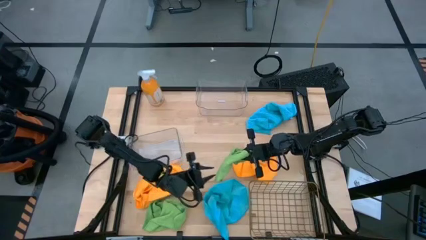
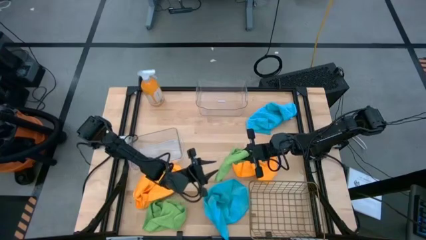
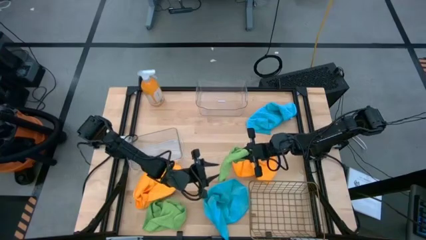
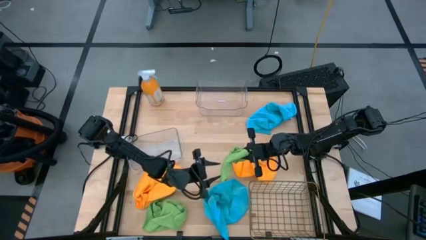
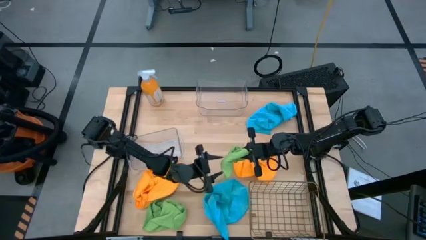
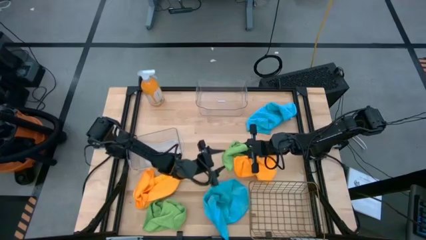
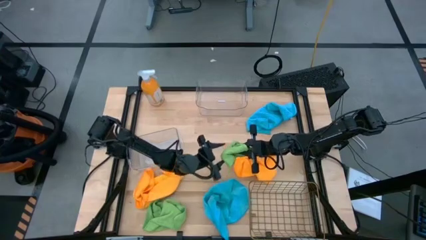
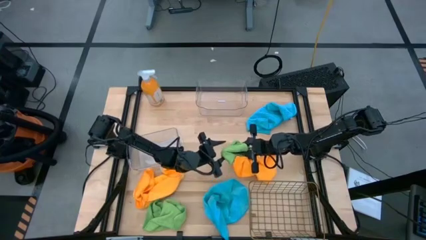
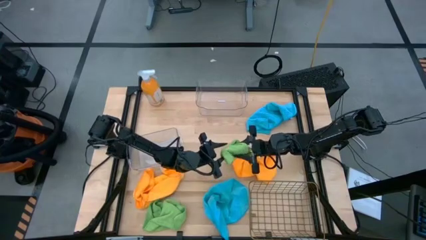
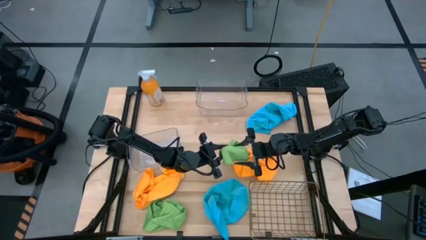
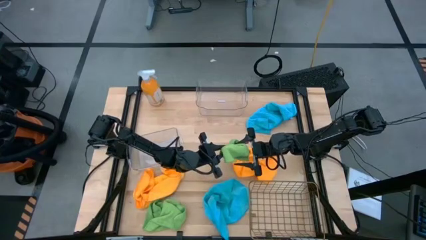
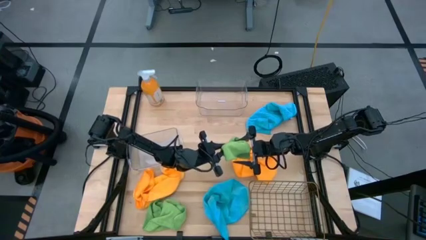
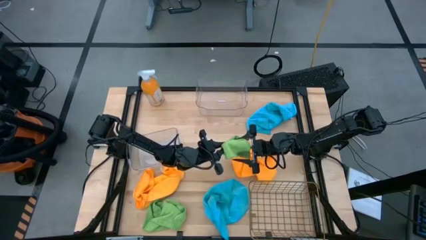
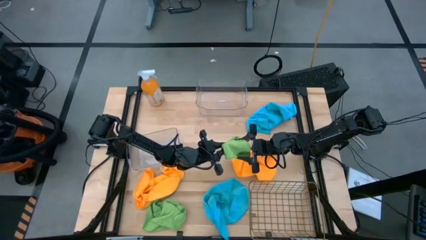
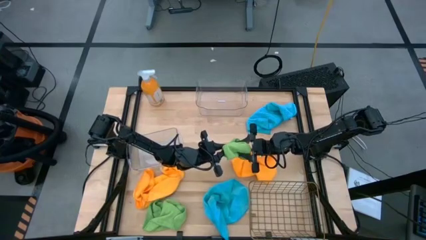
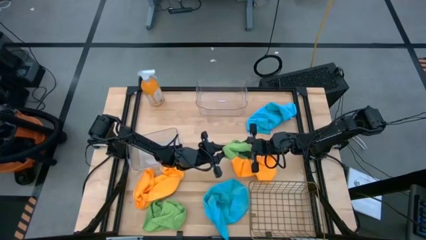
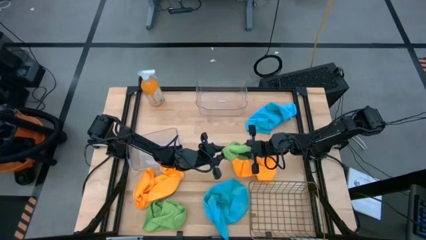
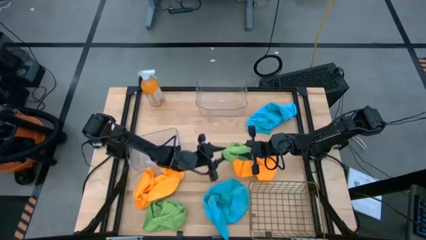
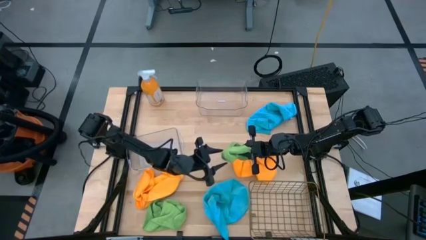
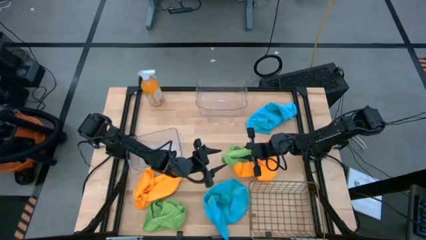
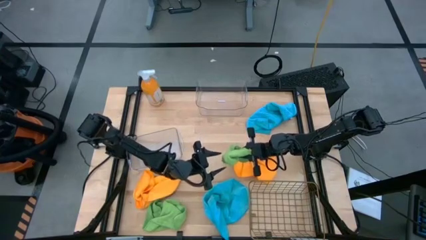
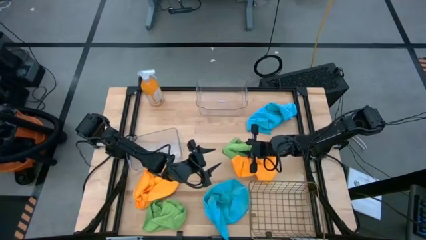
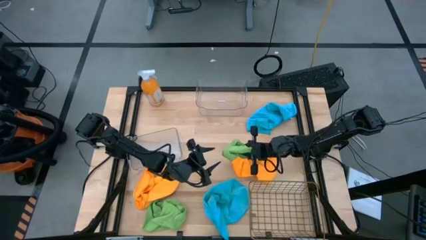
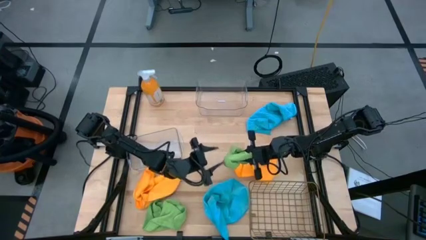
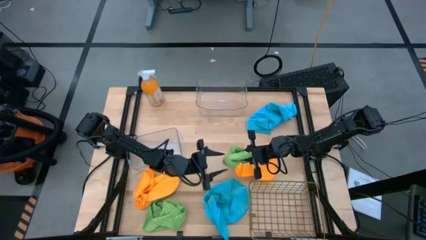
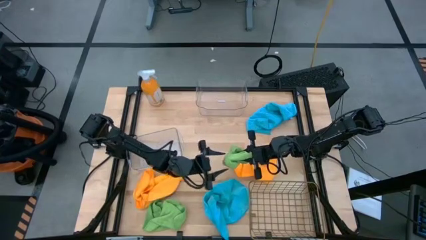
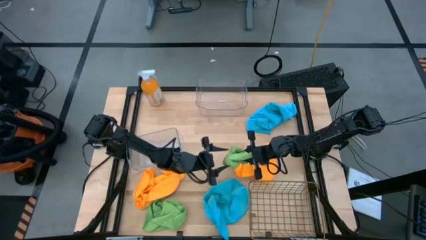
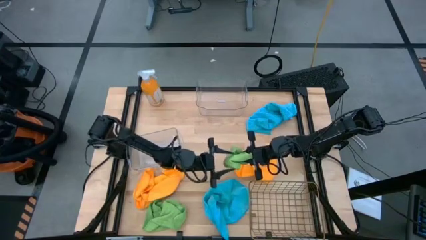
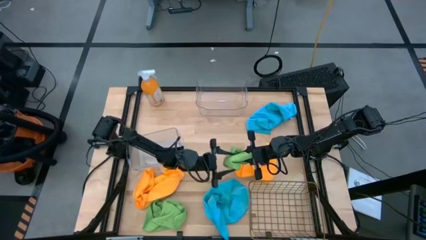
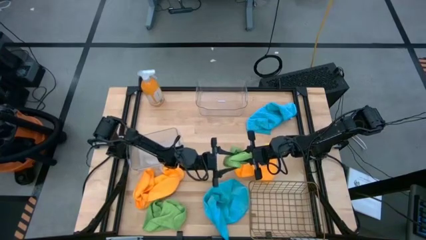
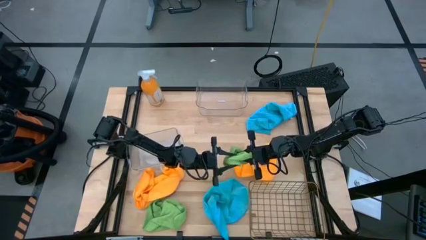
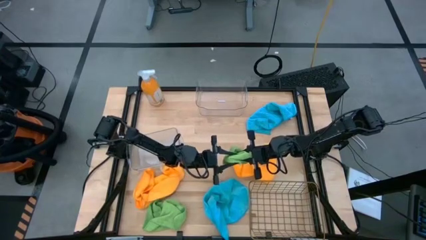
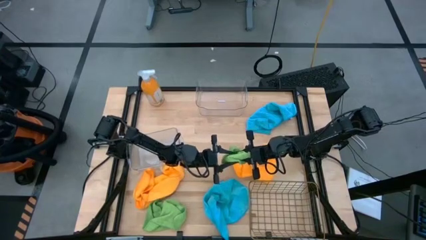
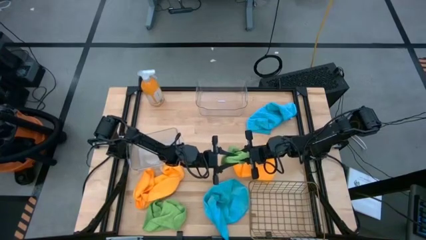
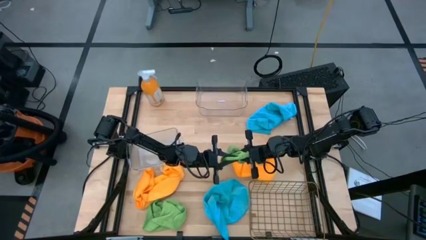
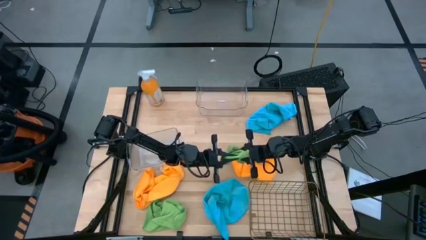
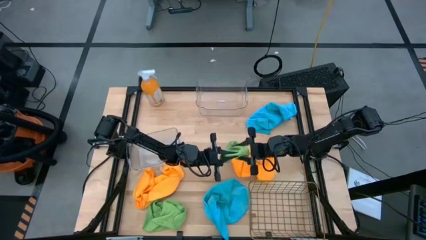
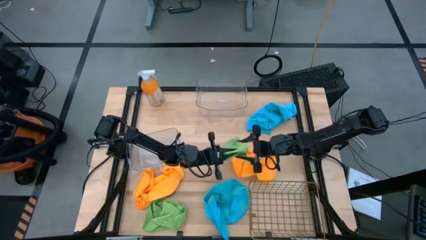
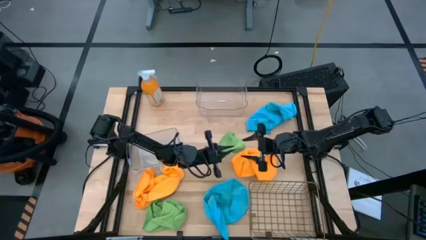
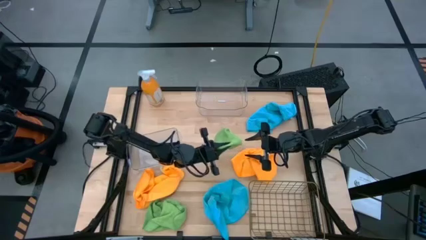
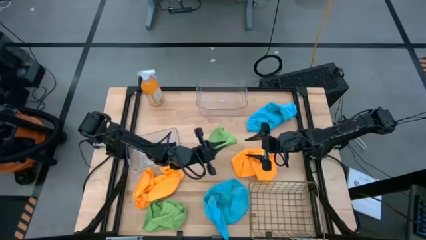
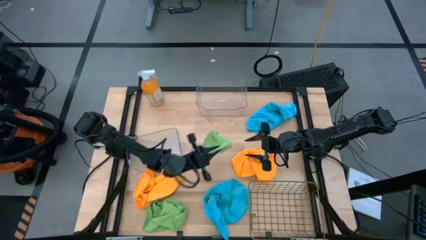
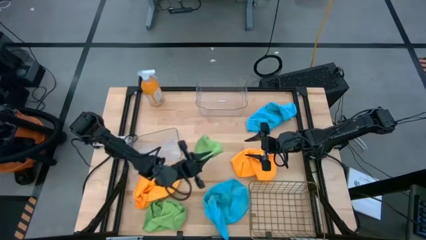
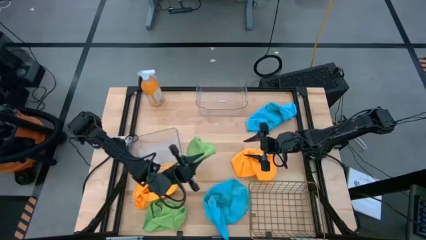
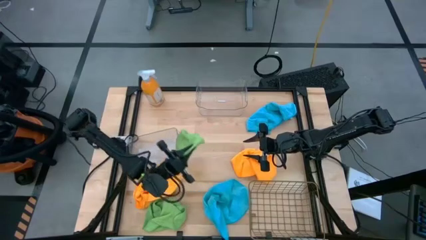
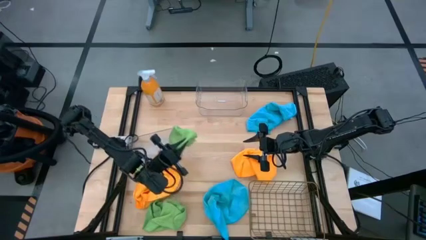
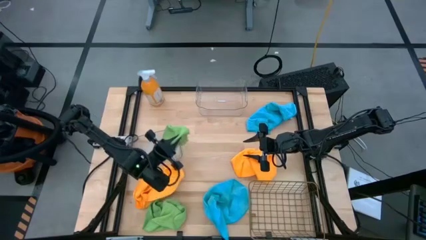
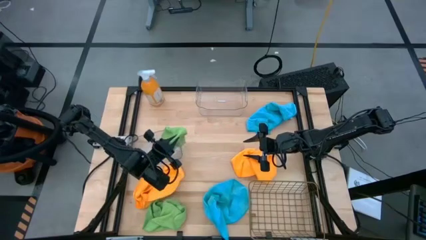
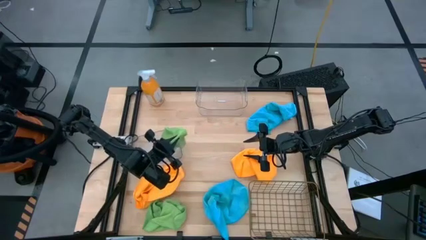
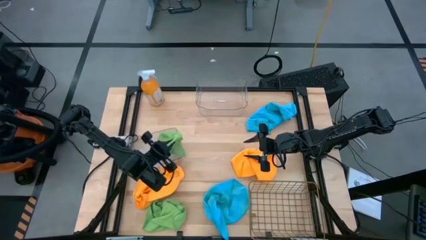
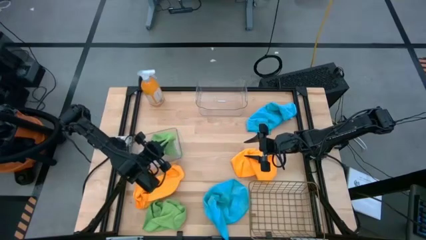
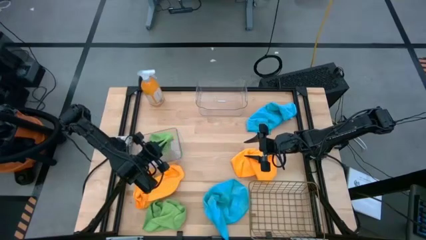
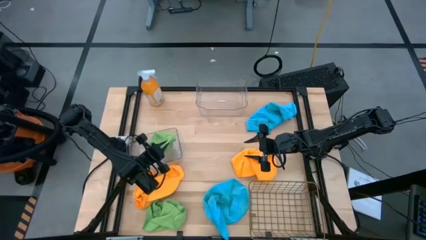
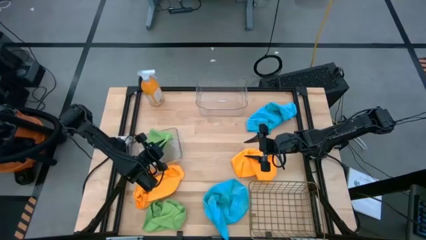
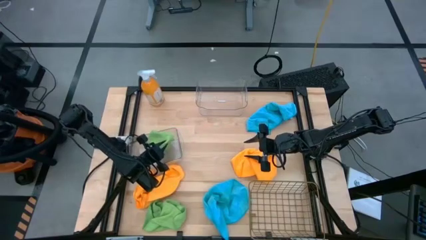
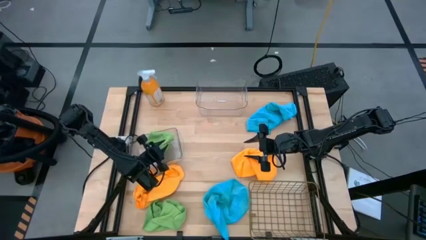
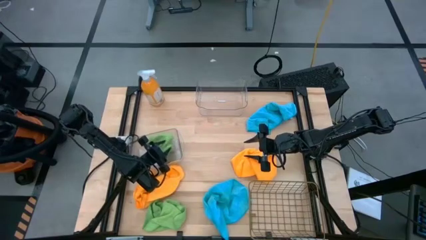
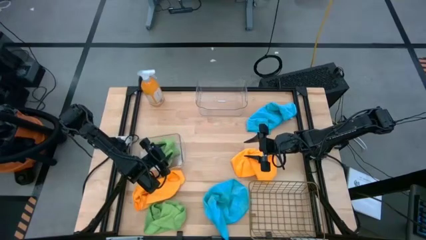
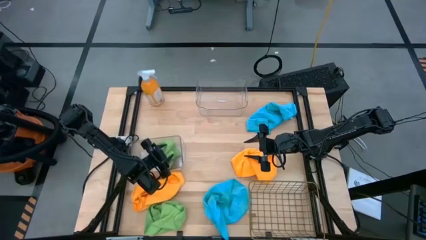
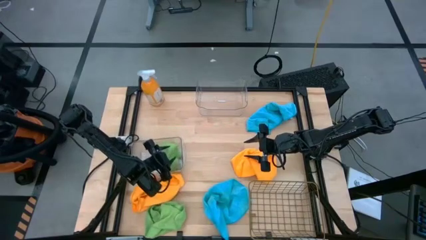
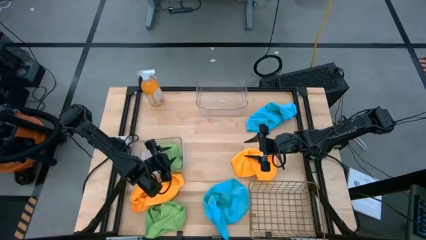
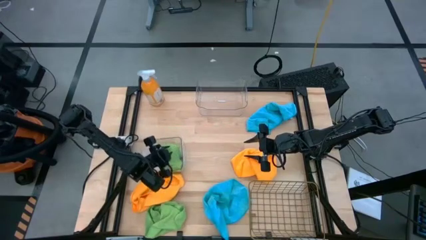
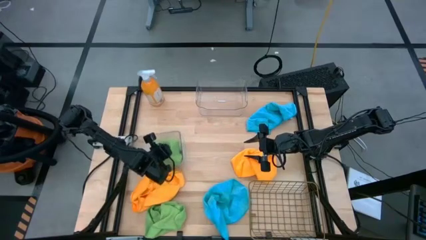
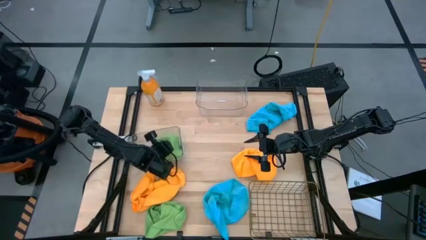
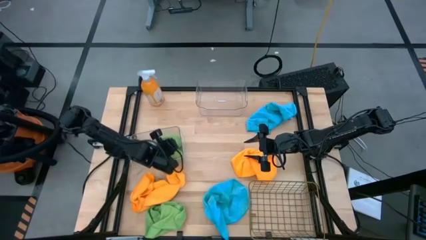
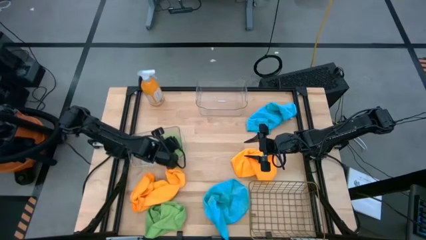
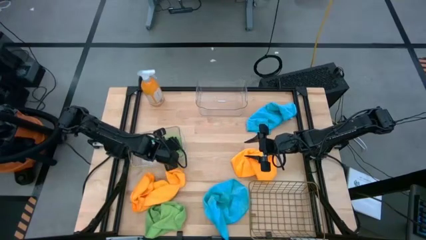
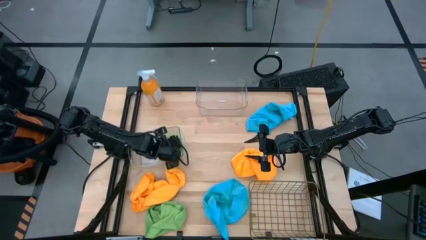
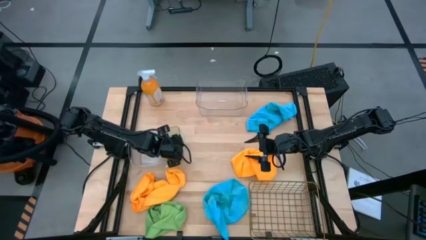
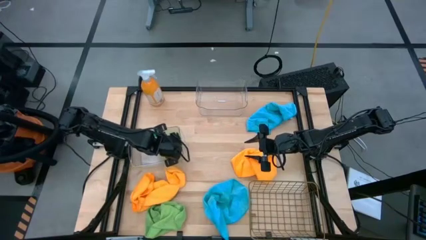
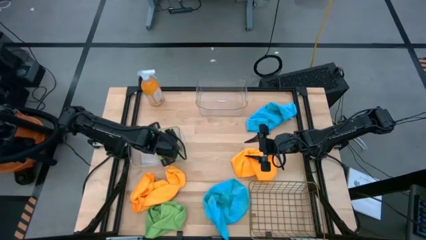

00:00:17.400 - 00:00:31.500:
Task: Sort microfiber towel by color & place in baskets
Put the top green microfiber towel into the bottom transparent bin

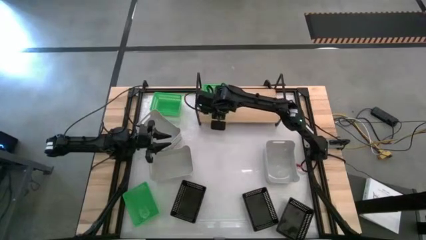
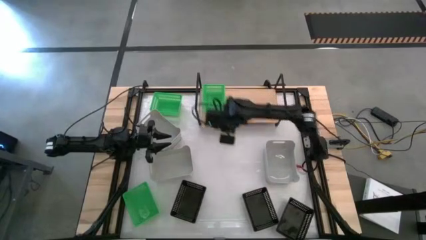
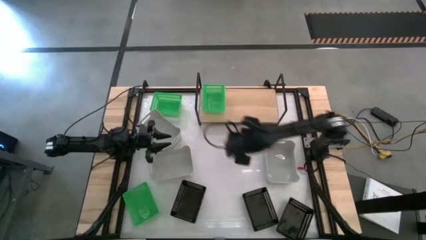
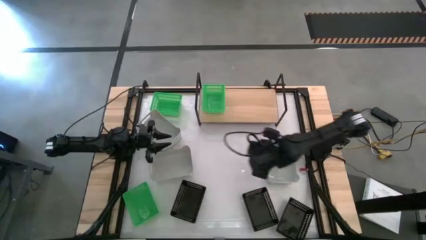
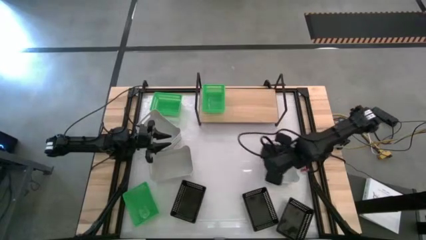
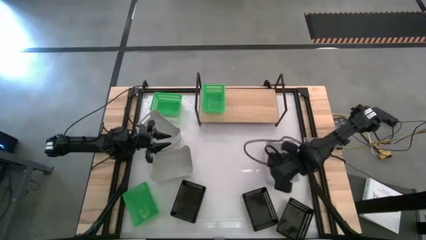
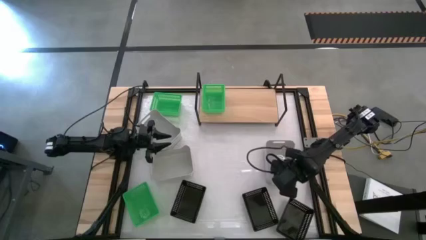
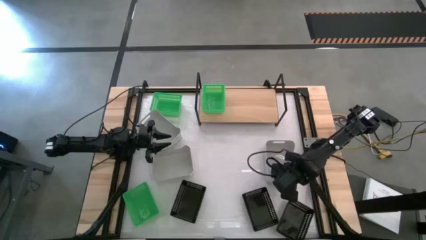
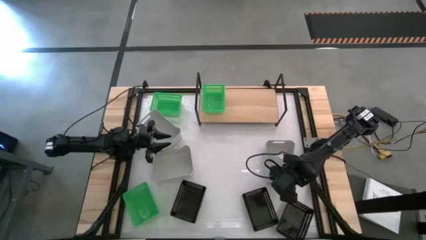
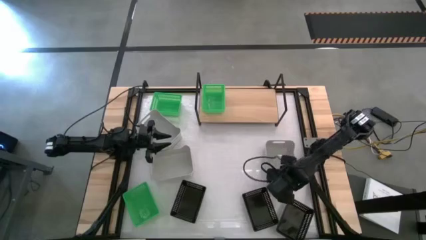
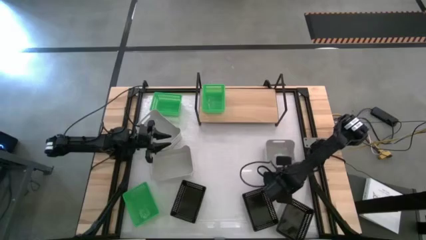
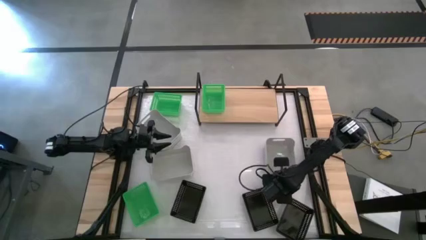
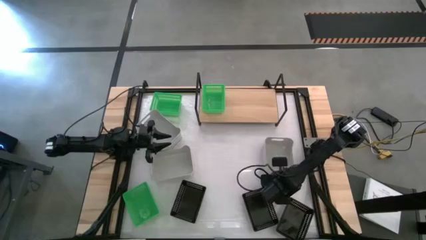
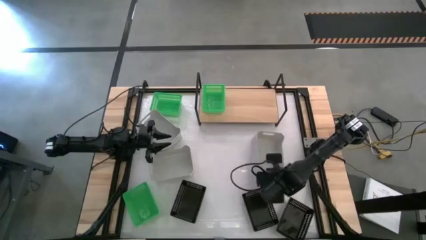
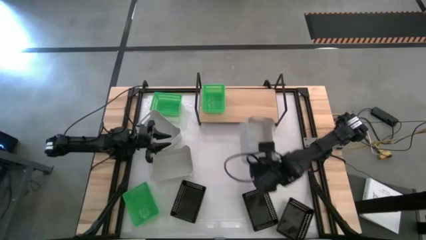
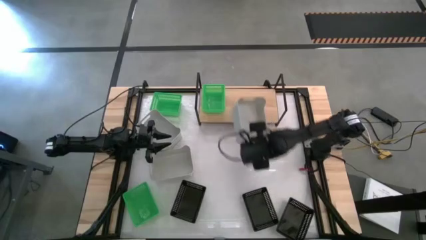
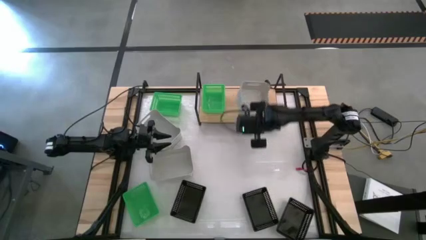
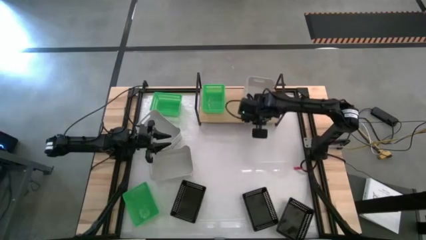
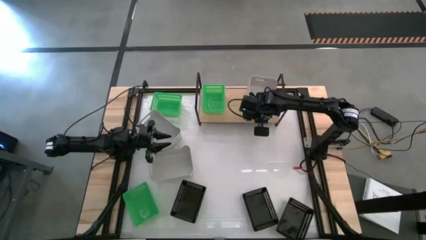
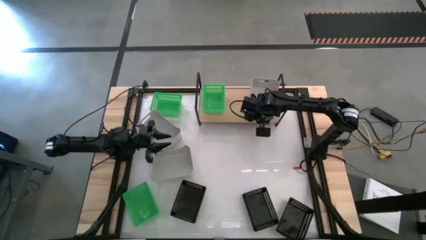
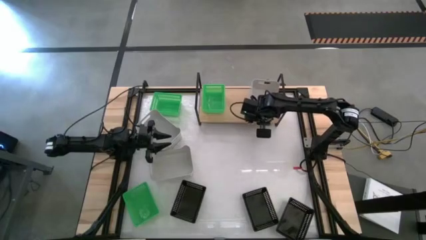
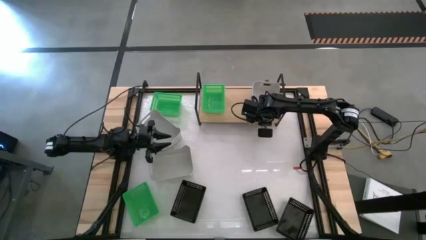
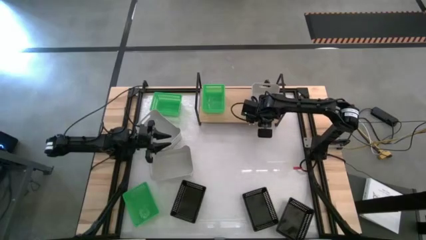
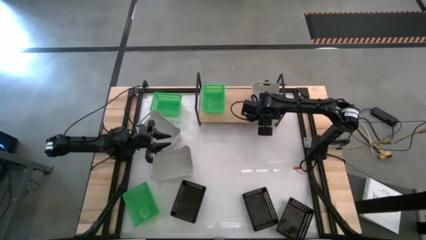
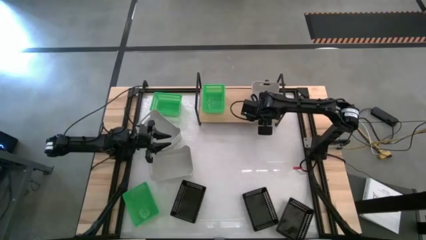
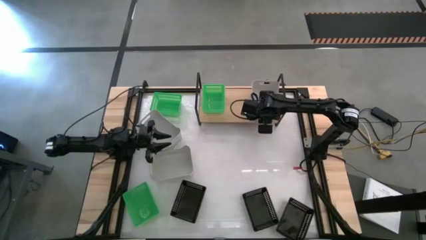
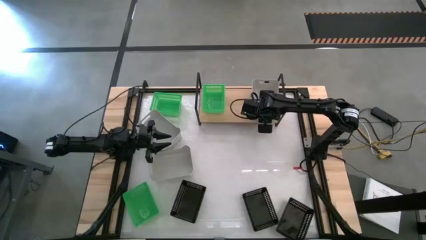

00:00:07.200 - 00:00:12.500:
Task: Stack baskets on shelf by color
Put the bottom right gray bin on the shelf
